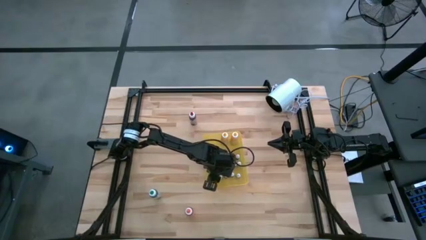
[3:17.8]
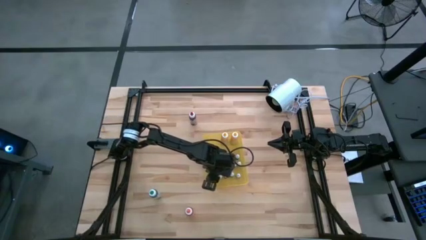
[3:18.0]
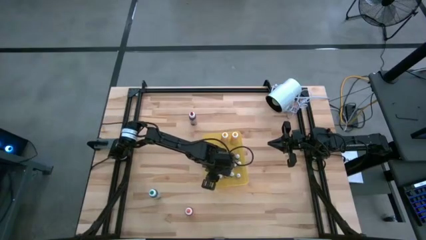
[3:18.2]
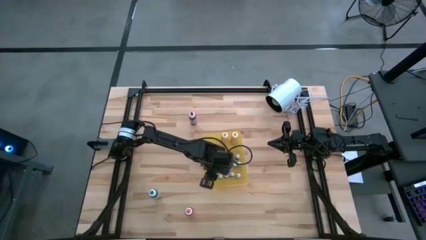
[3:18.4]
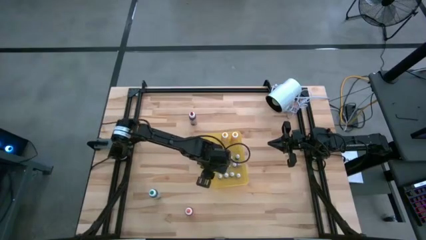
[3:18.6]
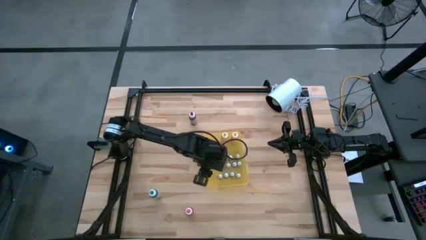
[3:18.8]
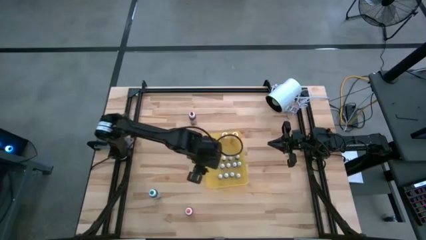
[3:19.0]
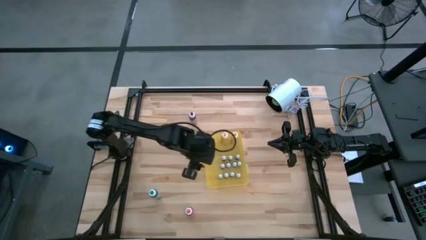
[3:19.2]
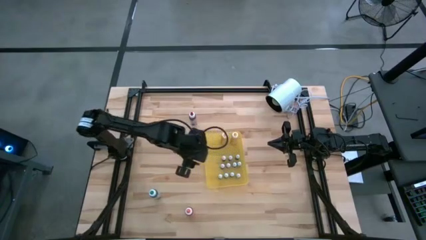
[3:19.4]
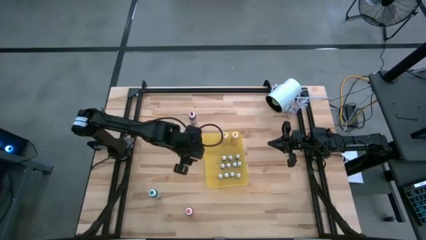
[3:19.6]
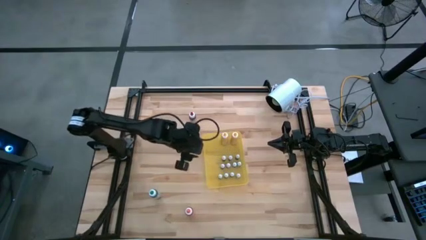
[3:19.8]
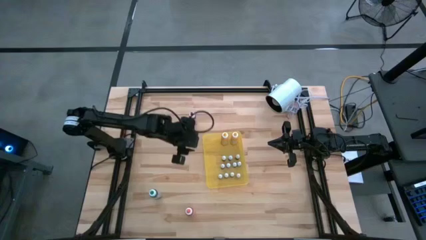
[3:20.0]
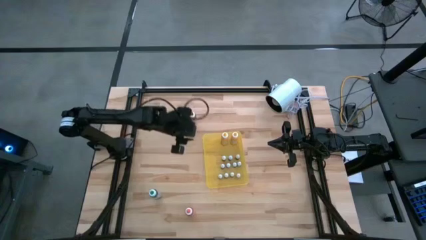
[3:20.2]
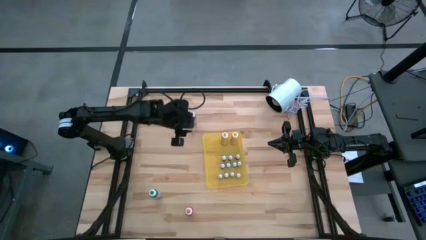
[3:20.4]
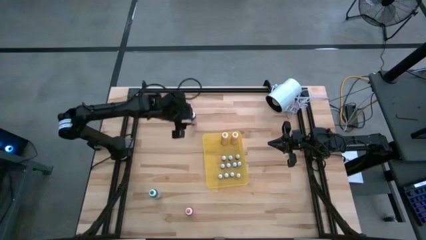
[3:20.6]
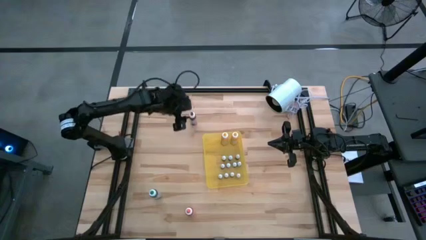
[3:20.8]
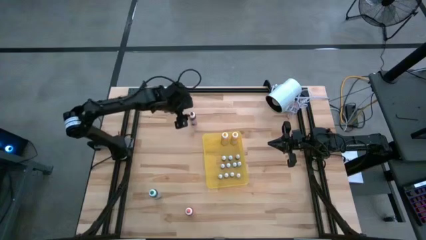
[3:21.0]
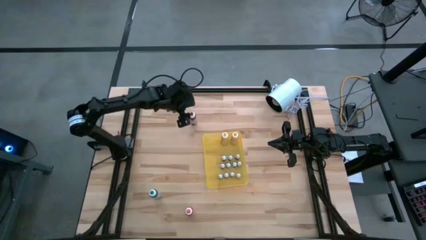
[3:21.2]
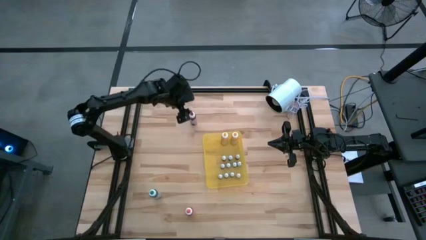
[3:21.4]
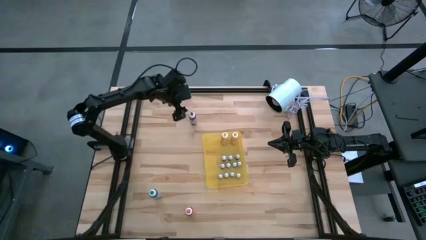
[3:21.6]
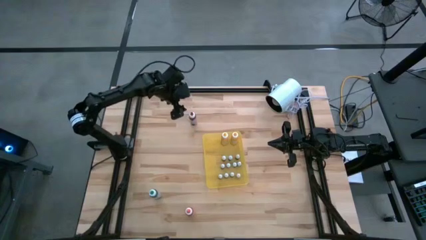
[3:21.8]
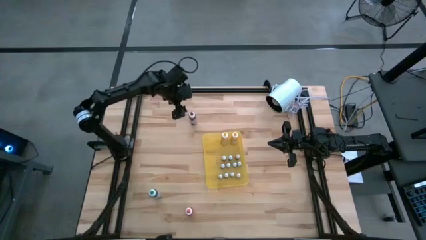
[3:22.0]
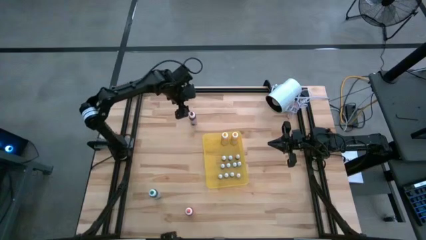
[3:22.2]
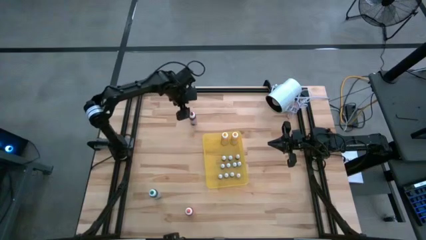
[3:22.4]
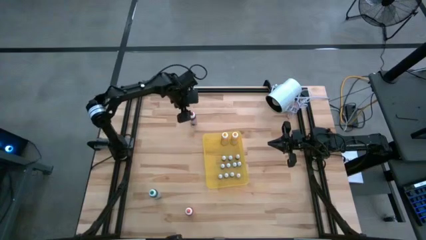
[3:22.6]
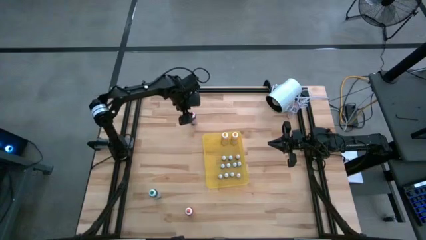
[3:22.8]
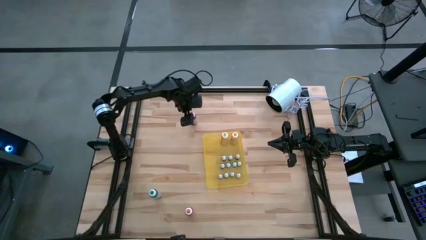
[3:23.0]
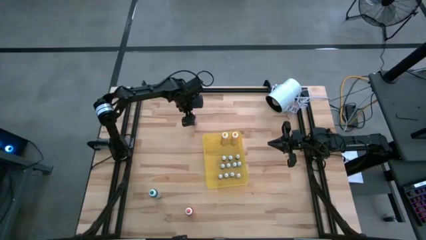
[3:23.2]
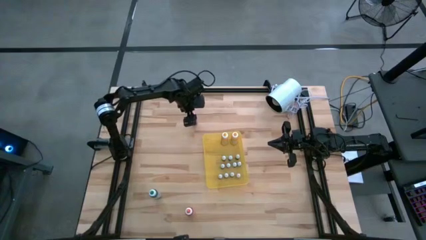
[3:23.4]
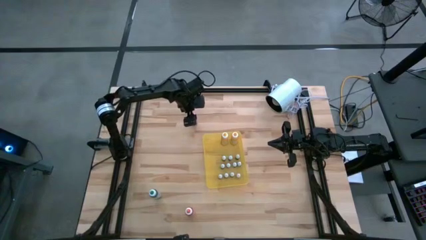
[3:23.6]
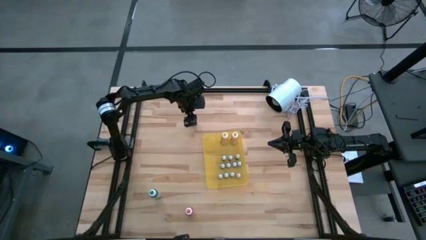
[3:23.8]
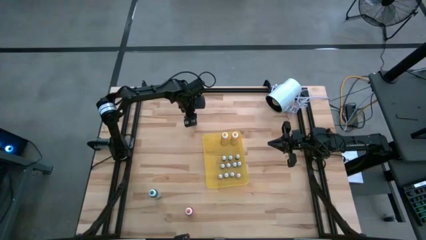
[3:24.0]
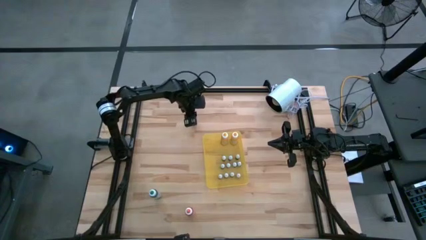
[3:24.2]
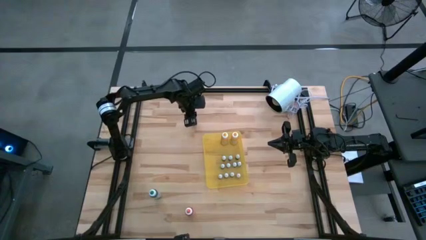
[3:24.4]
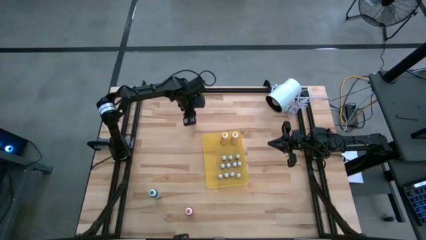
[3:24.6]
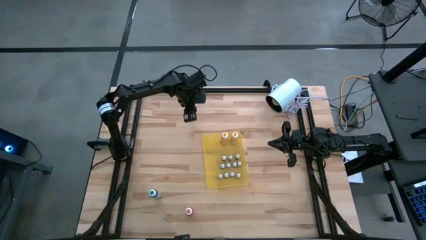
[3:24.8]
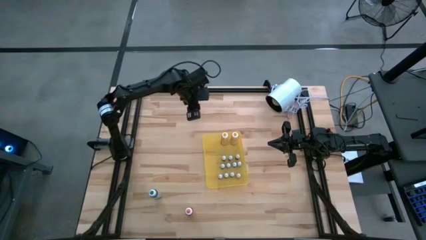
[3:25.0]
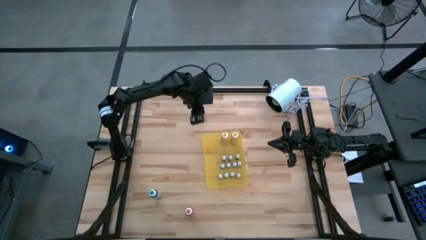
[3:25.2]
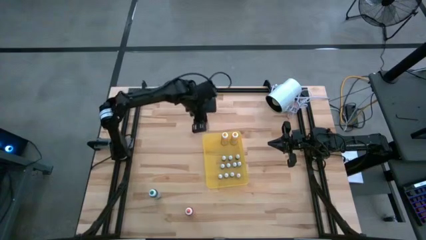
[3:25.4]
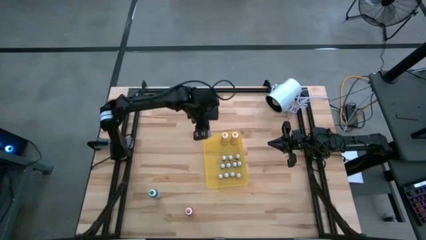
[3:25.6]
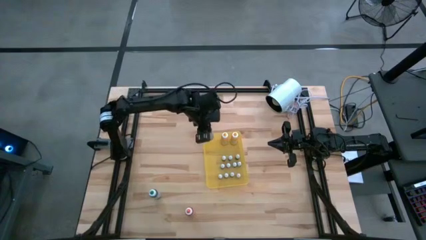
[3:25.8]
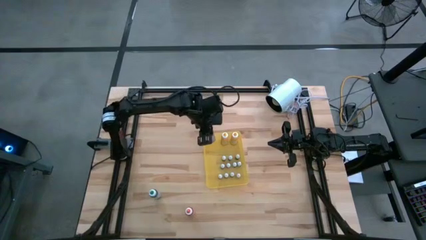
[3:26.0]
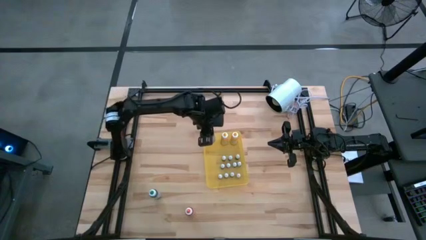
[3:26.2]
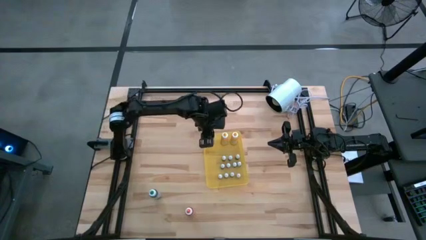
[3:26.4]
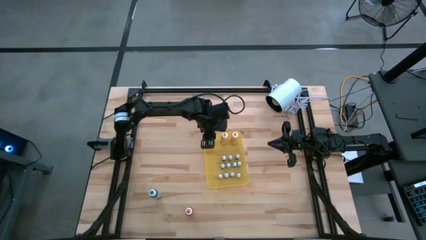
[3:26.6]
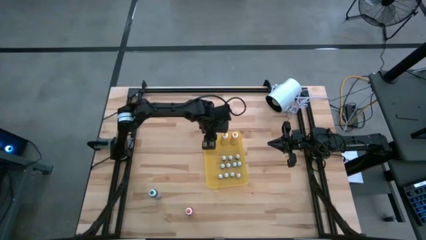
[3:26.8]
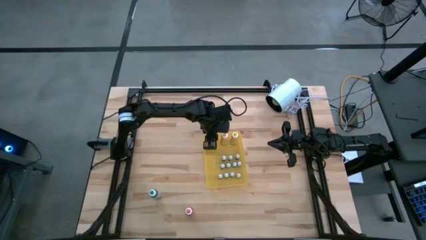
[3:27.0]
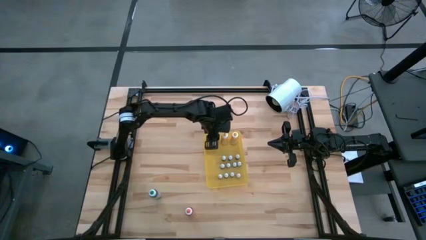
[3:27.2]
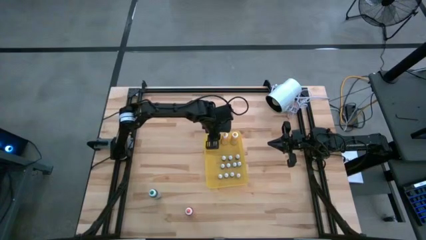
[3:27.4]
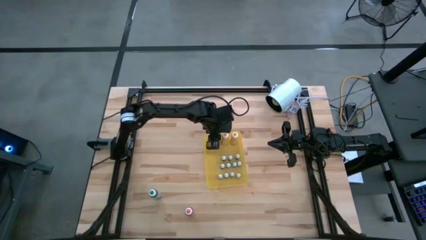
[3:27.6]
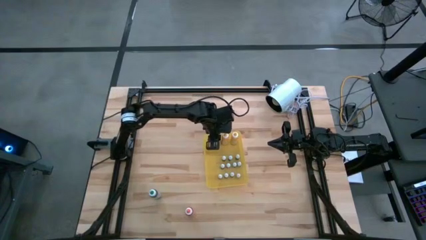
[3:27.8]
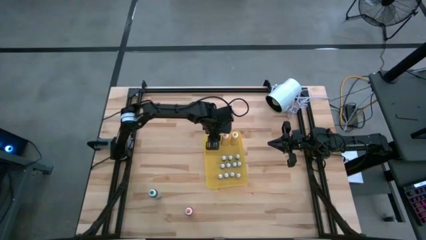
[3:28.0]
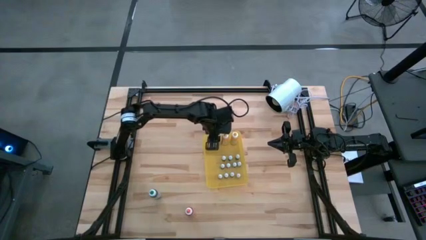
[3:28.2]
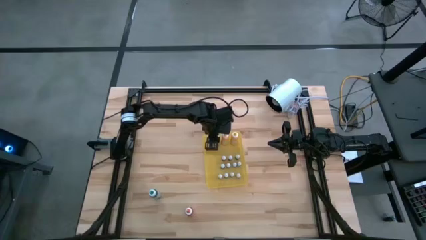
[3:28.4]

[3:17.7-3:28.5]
Task: Pick & Place food coloring
Put the large red food coloring bottle into the yellow bin

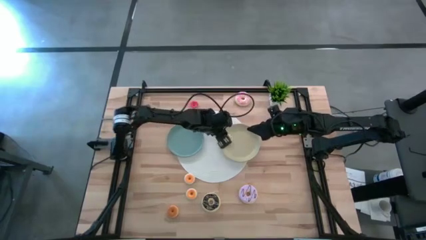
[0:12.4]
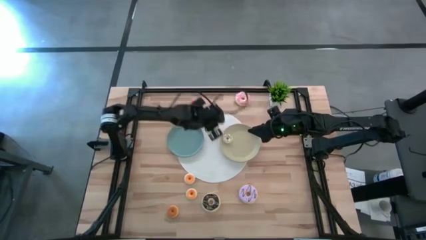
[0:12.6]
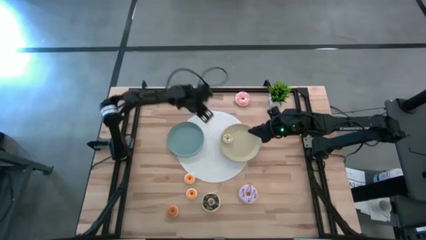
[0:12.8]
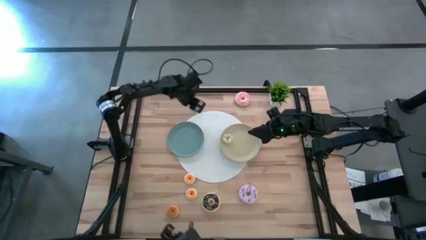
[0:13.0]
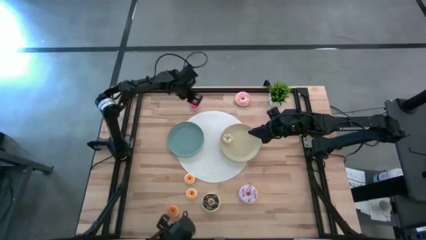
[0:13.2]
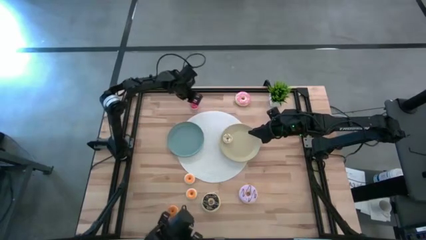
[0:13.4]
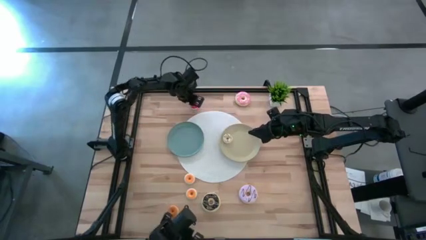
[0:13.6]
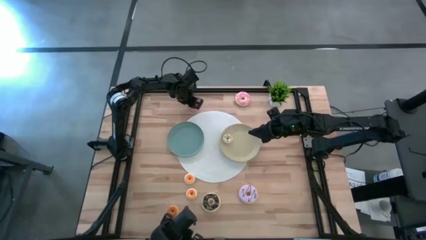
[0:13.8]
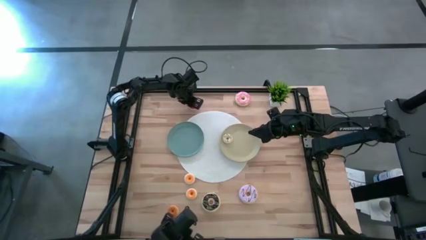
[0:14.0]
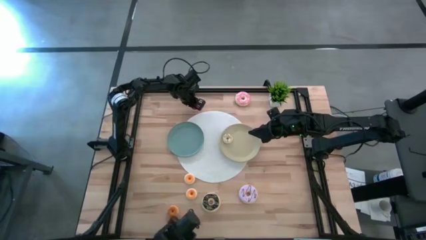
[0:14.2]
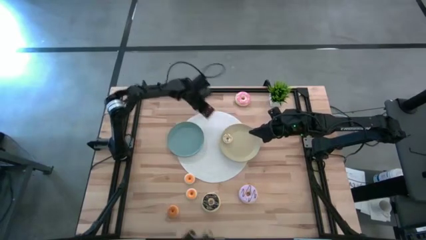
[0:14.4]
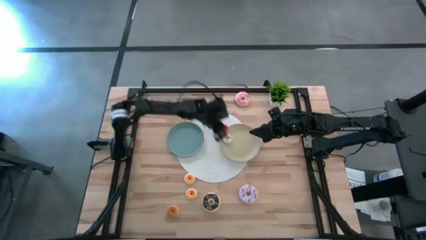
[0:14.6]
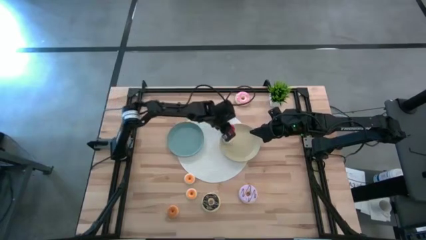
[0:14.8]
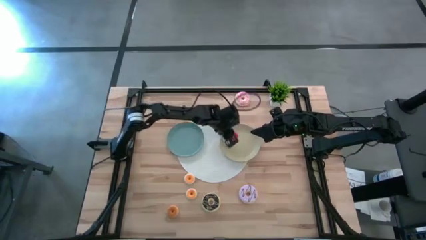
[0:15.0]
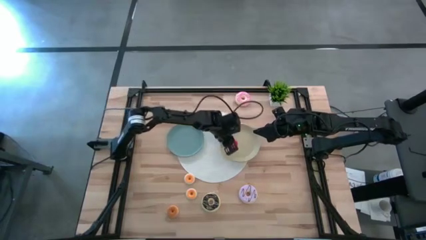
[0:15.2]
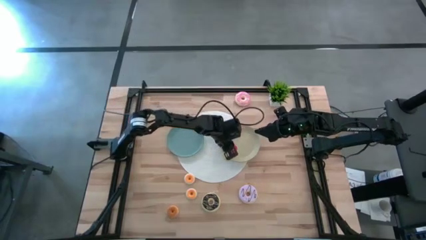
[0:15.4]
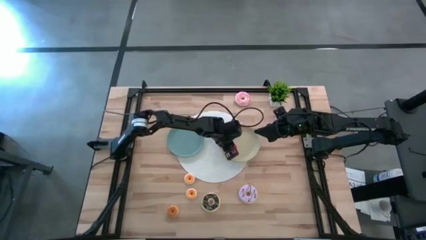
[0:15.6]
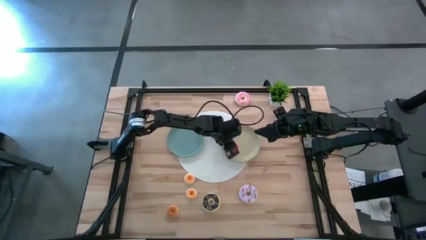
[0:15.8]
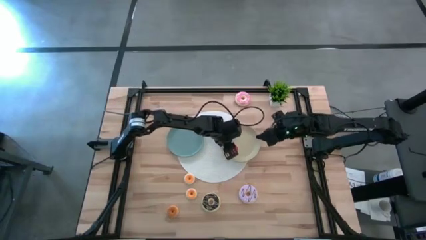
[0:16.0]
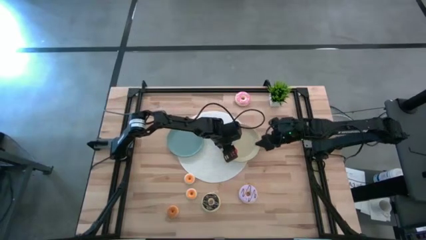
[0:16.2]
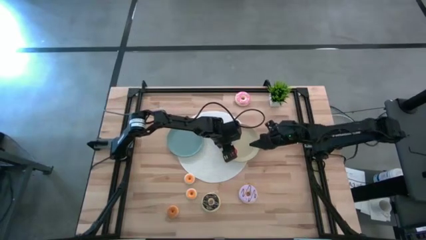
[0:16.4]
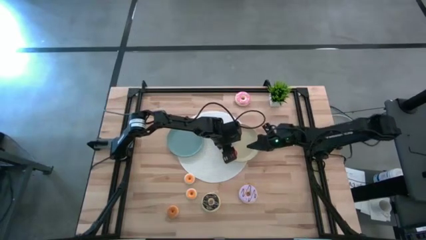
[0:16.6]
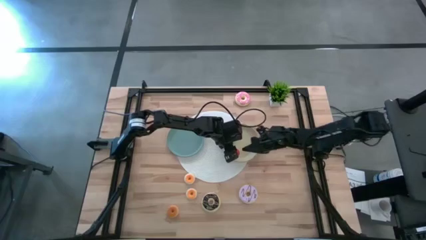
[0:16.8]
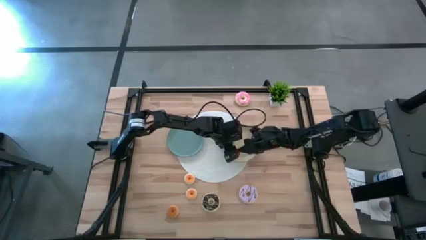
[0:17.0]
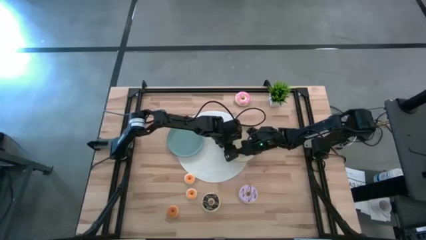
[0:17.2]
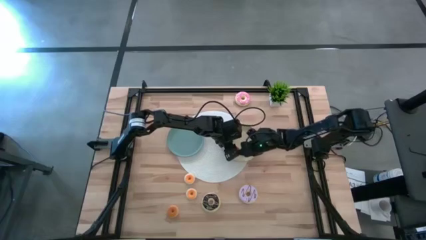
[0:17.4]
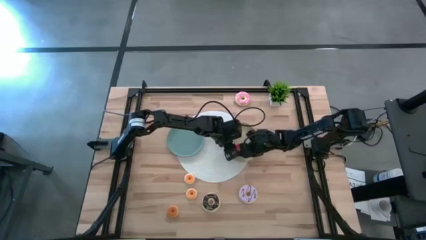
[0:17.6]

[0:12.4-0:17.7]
Task: Pick & Place donuts
Put the small red donut on the brown plate
